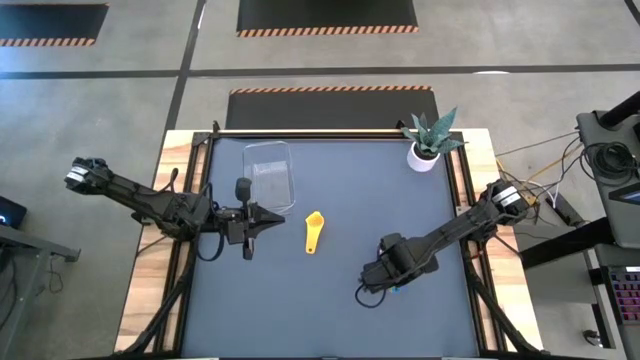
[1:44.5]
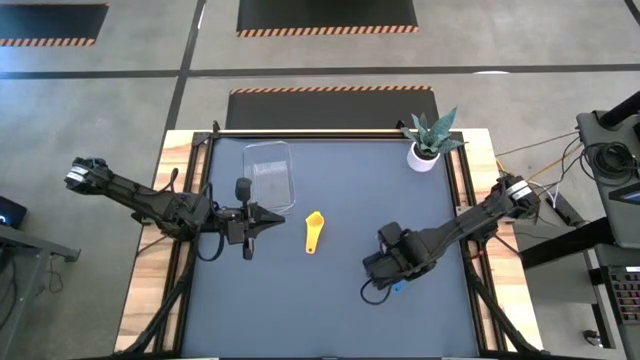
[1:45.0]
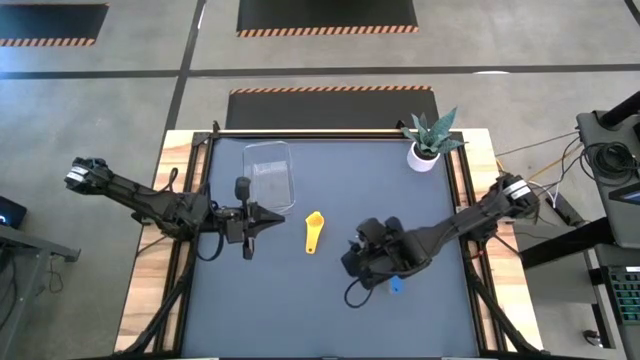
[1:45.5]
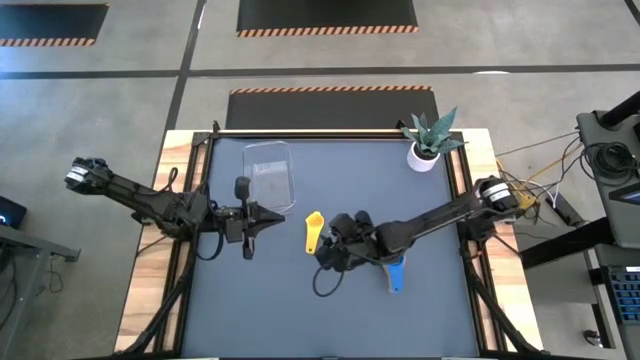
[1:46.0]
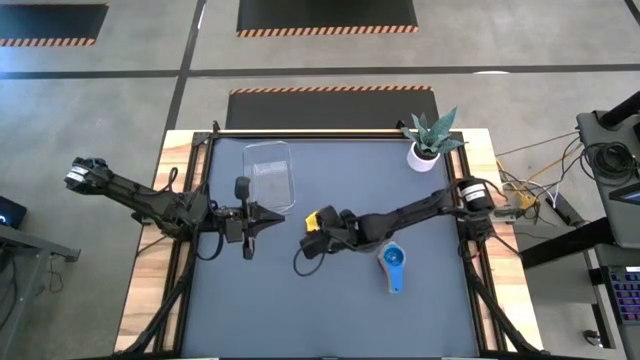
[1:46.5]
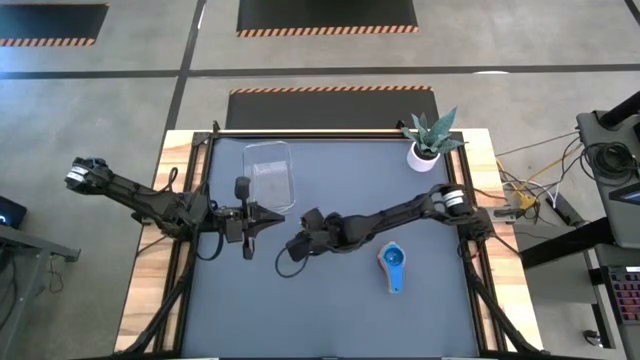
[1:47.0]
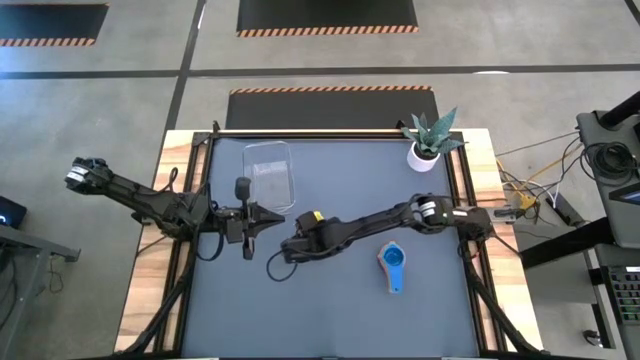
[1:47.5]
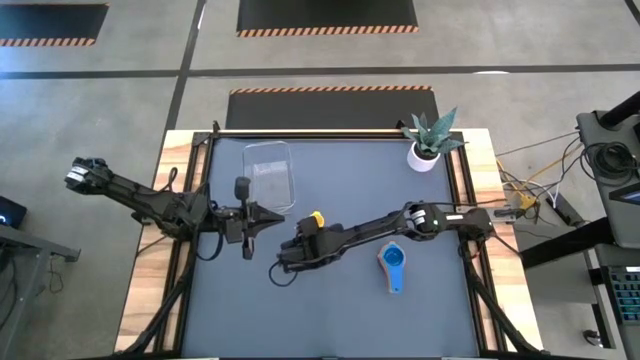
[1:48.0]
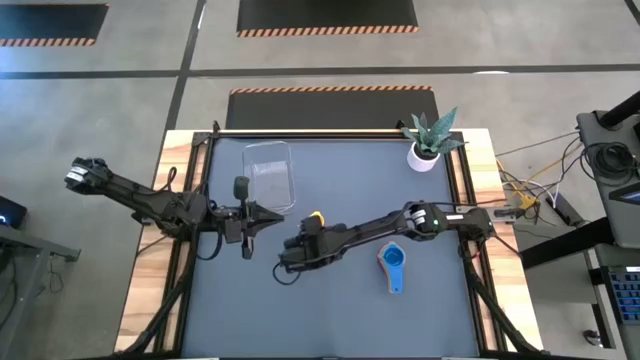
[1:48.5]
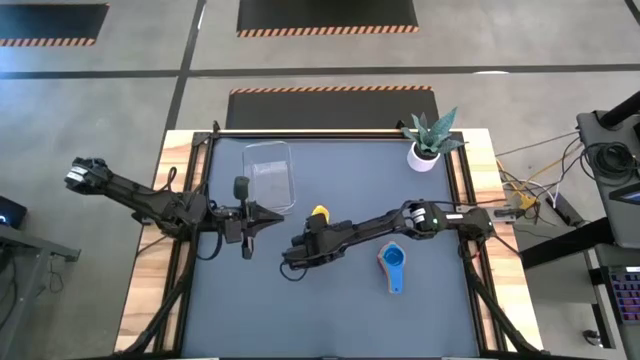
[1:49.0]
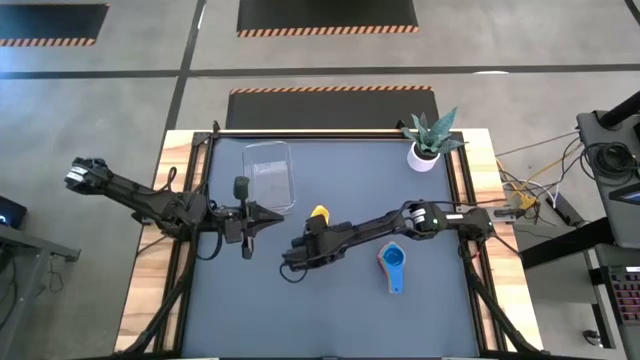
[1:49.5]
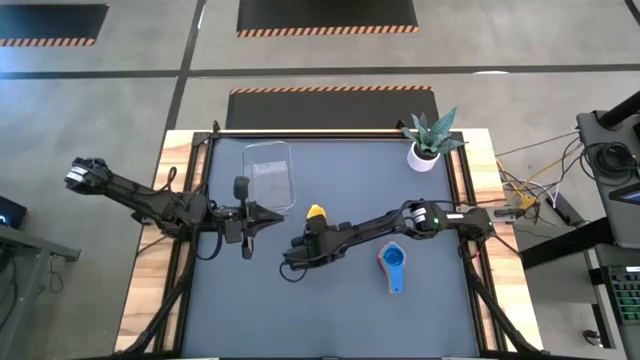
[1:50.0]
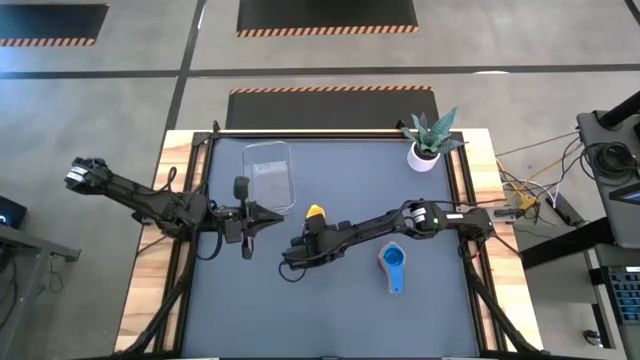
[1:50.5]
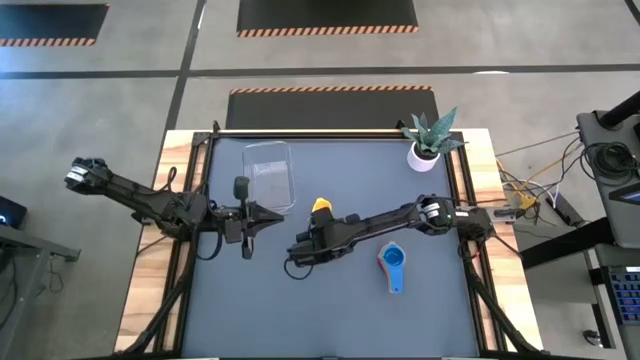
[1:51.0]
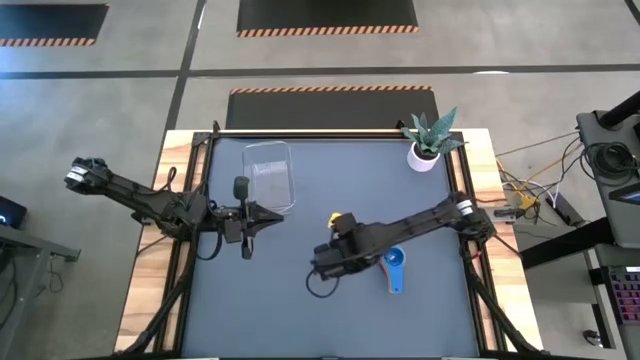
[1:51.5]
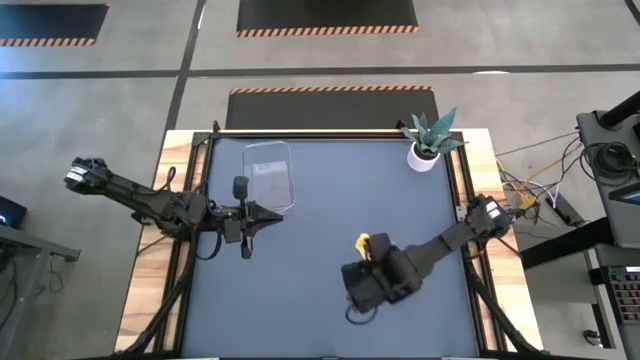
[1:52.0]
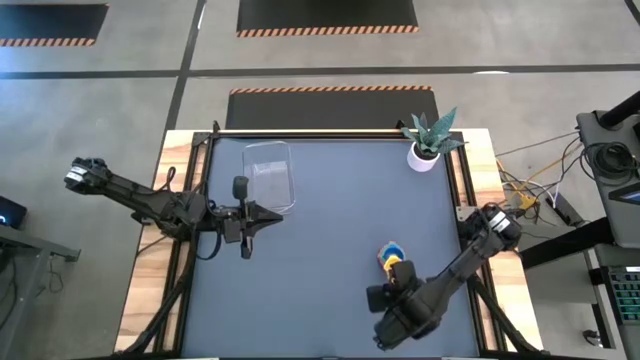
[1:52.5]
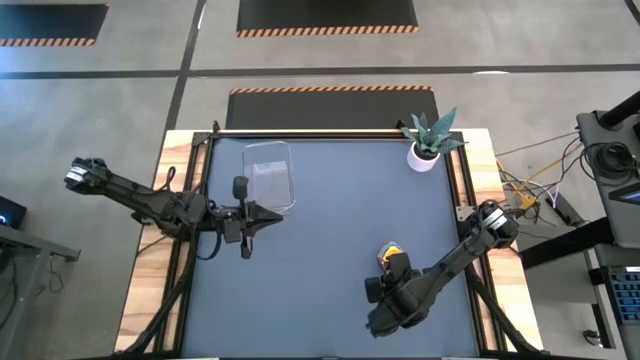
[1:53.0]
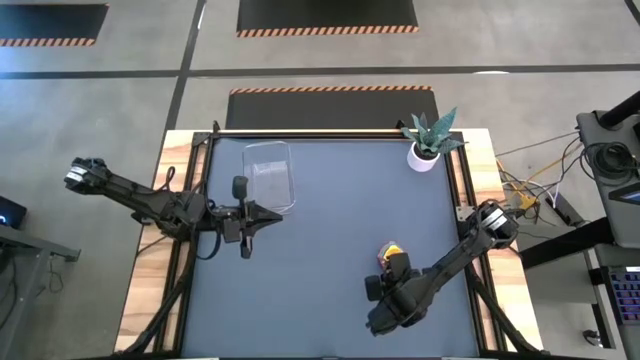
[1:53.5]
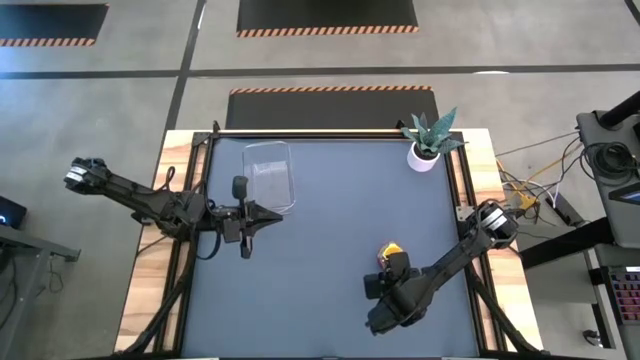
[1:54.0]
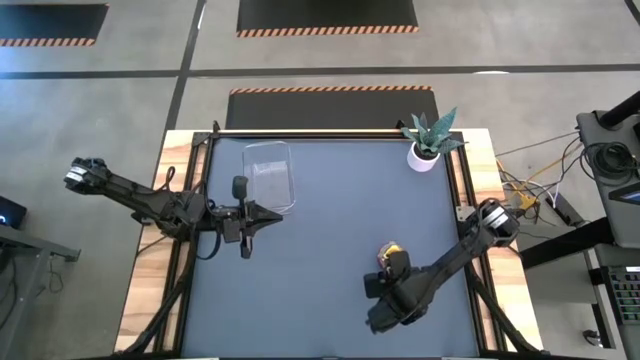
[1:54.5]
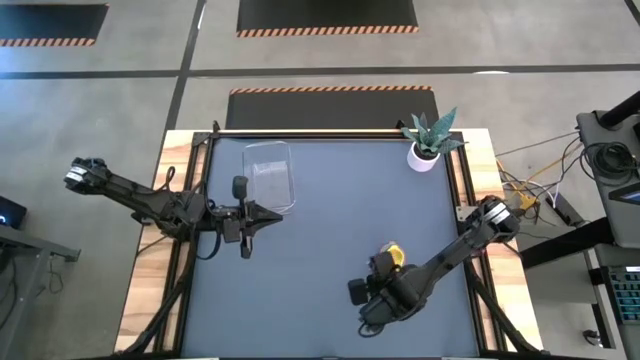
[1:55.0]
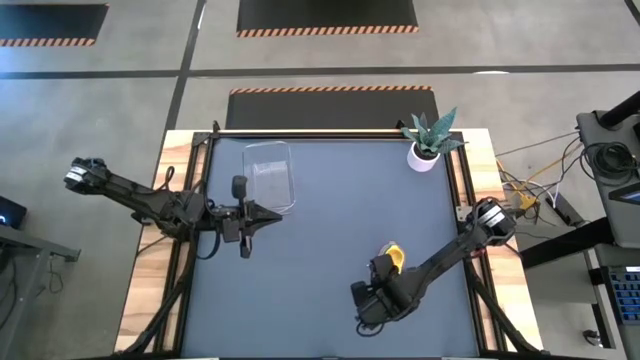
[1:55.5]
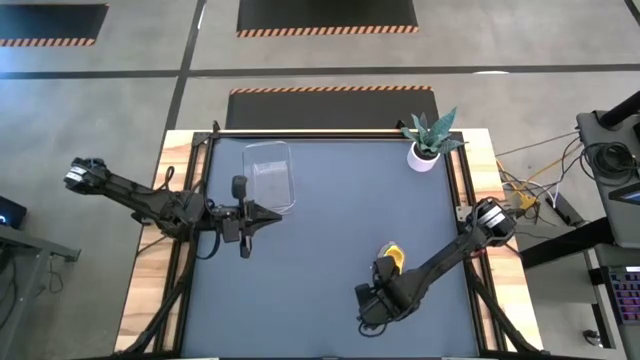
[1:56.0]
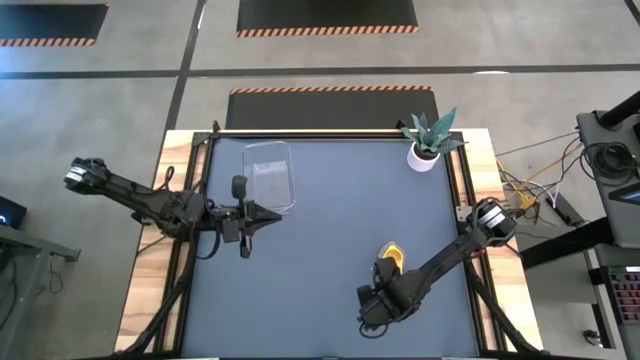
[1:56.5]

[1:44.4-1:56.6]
Task: Nest measuring cups in basket
Stack the yellow measuring cup on top of the blue measuring cup

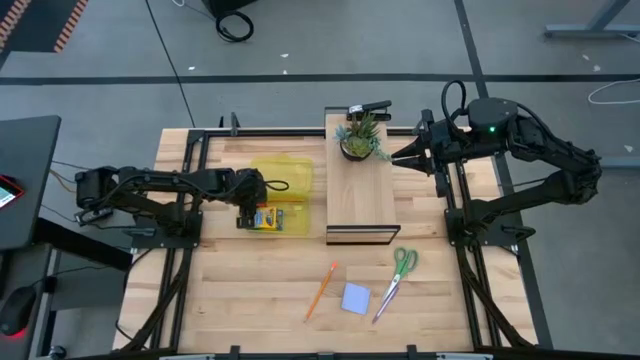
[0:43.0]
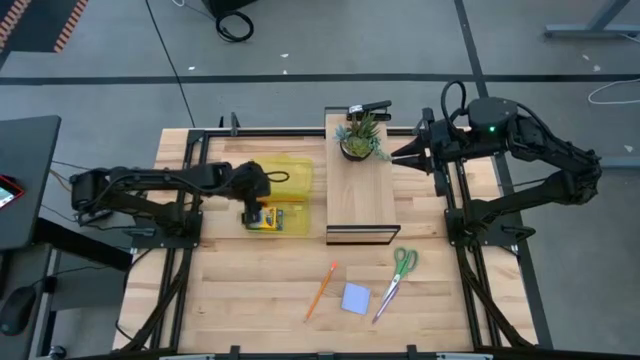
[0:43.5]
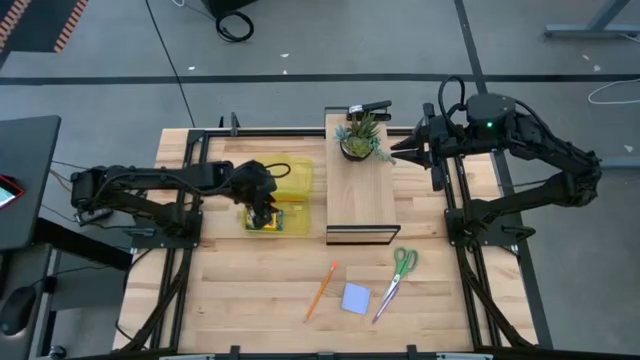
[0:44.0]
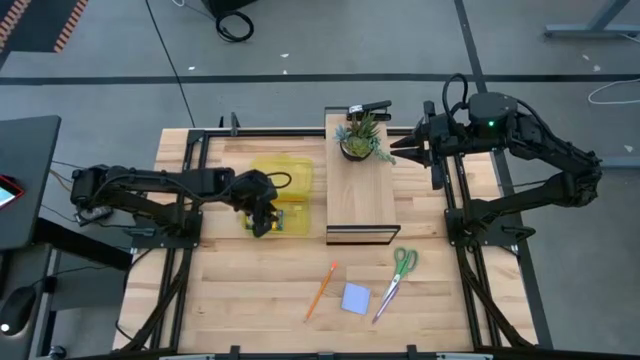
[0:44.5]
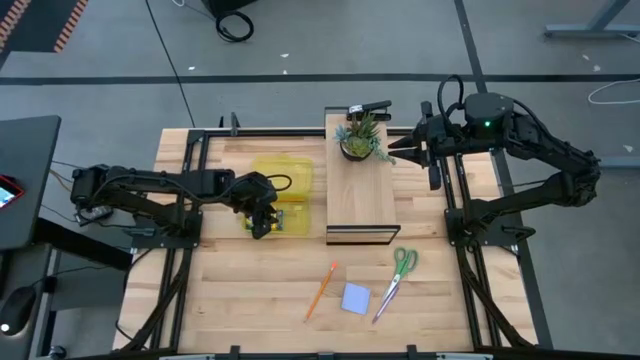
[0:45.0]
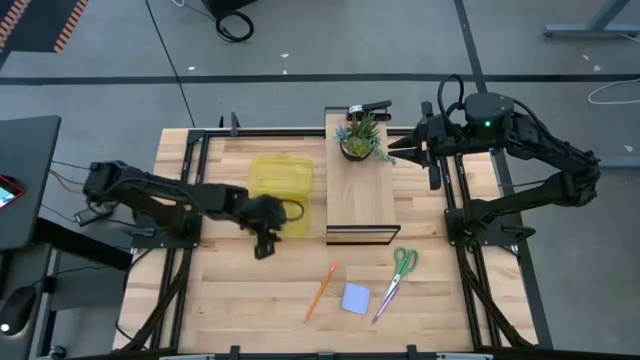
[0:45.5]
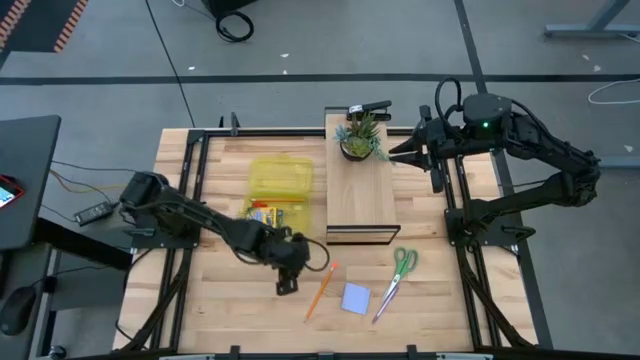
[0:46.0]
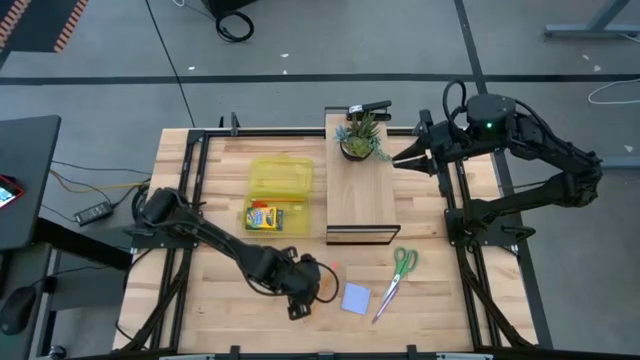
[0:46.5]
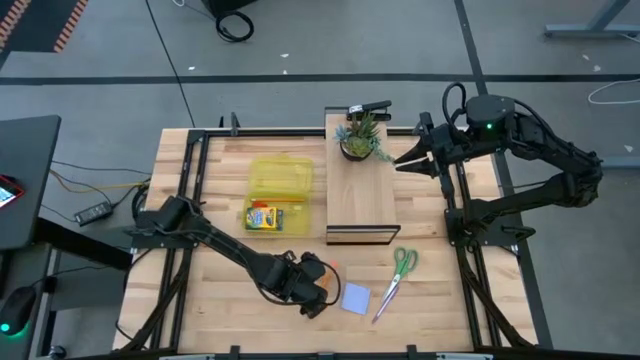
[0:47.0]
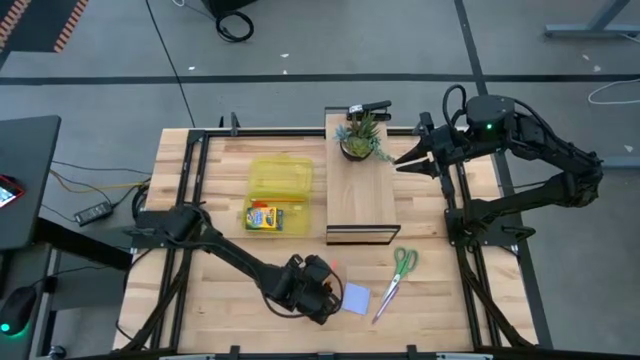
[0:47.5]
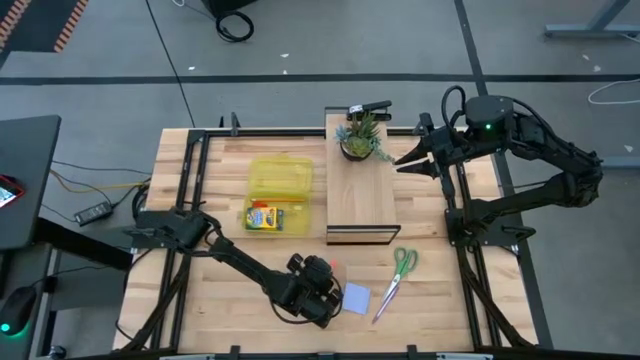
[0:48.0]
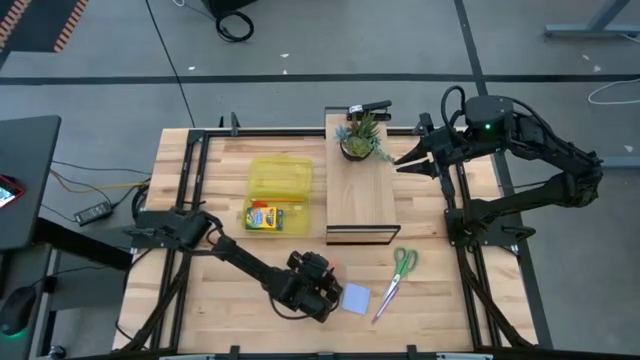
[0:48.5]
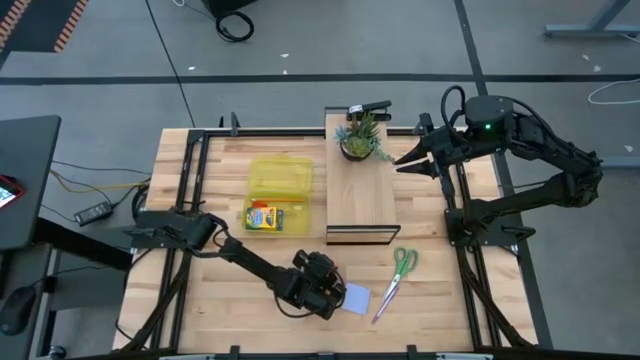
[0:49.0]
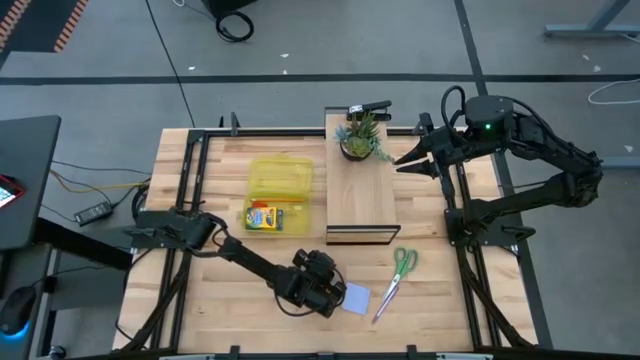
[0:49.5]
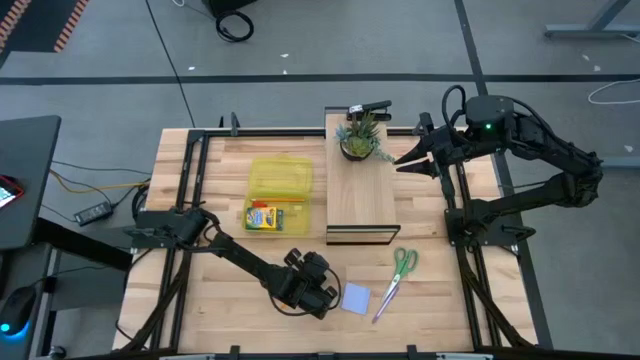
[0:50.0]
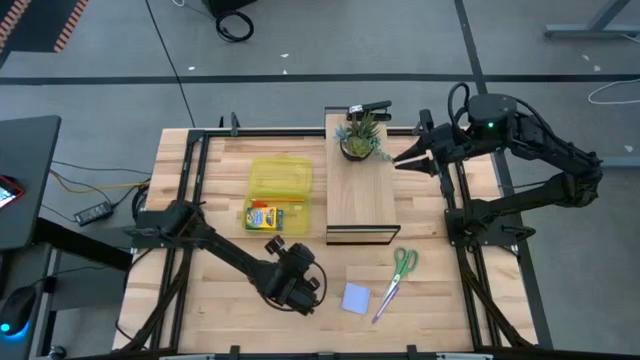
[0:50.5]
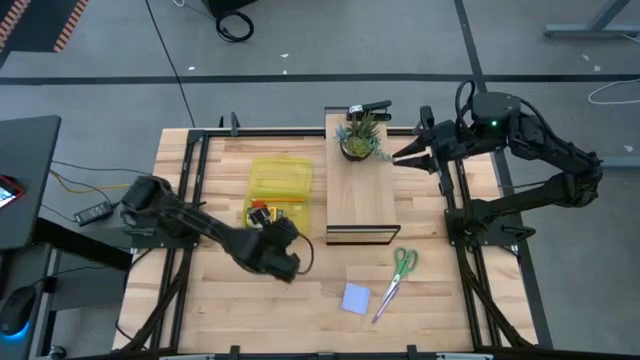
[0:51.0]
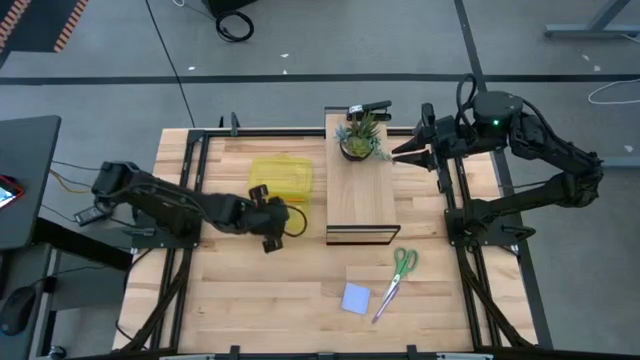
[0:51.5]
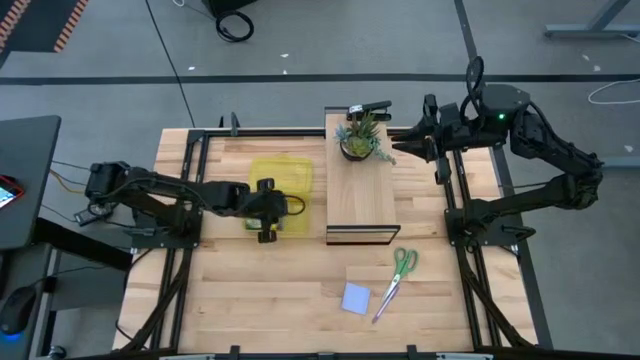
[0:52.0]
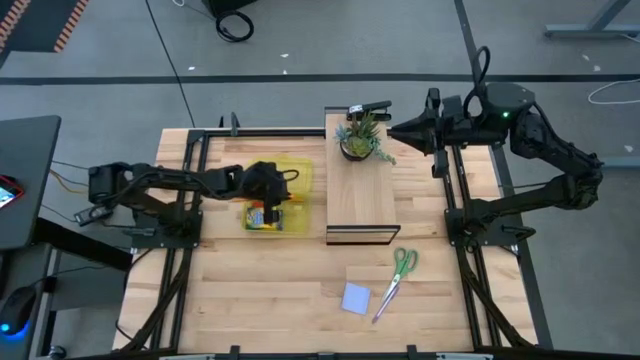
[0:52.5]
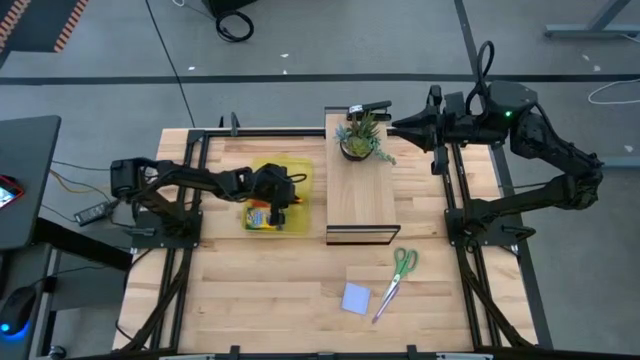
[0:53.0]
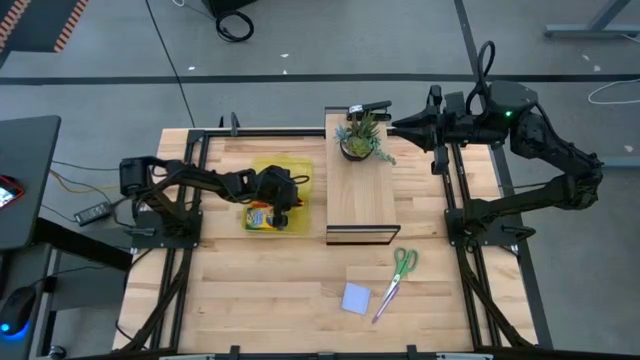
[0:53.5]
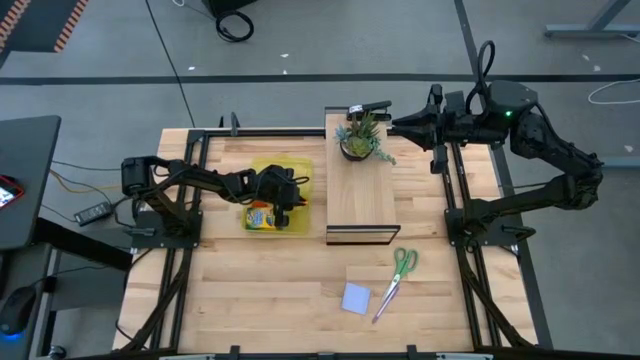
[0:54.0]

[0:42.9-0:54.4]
Task: Pack school essentials
Put the pencil into the supply box
